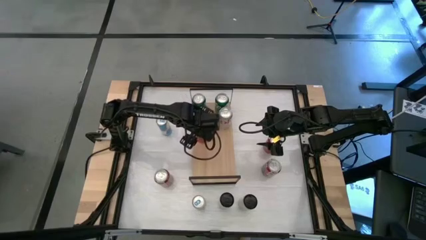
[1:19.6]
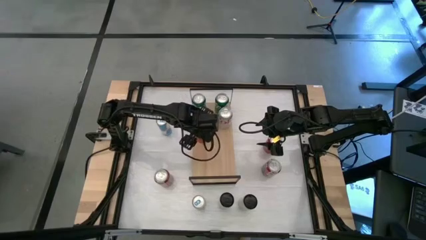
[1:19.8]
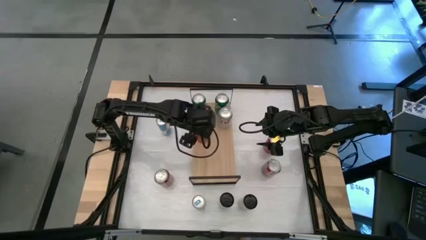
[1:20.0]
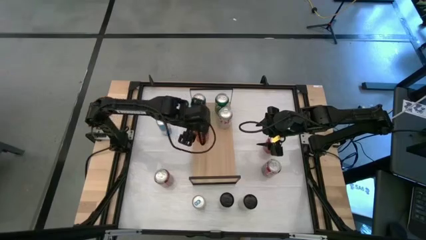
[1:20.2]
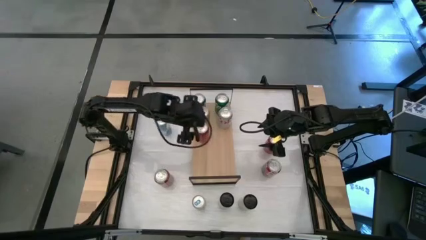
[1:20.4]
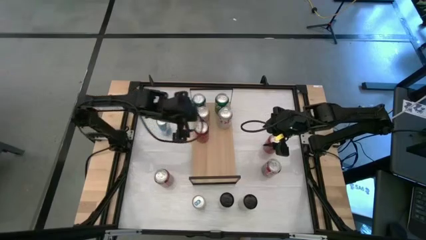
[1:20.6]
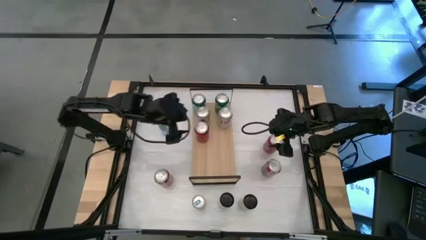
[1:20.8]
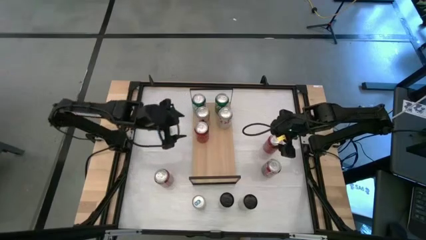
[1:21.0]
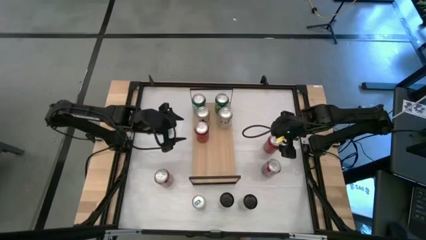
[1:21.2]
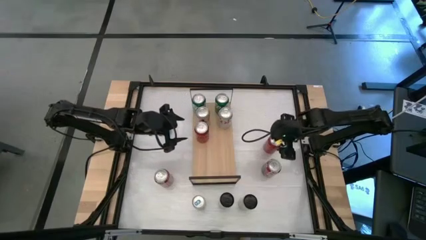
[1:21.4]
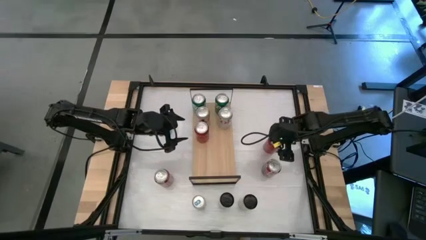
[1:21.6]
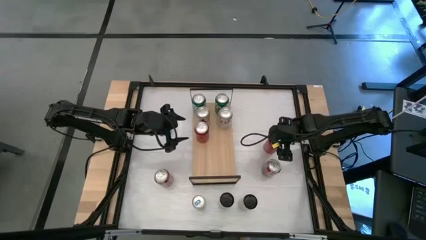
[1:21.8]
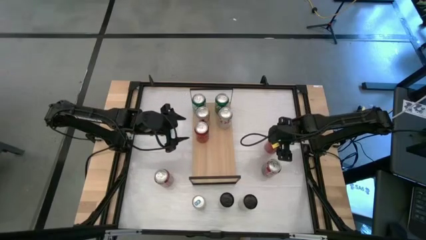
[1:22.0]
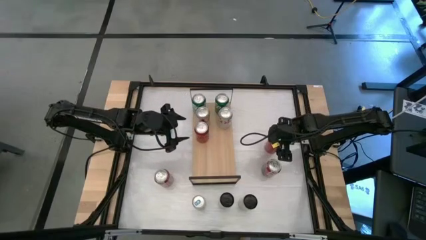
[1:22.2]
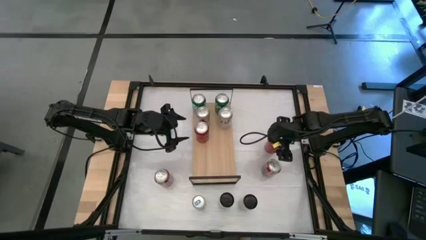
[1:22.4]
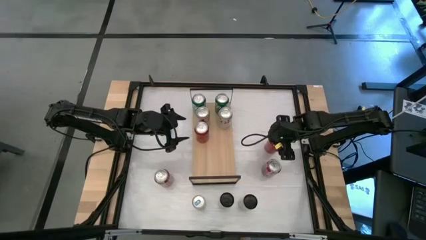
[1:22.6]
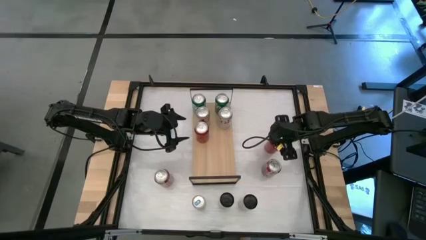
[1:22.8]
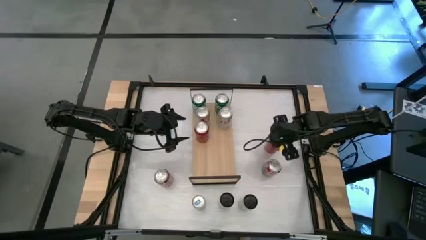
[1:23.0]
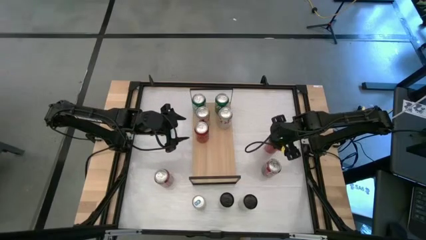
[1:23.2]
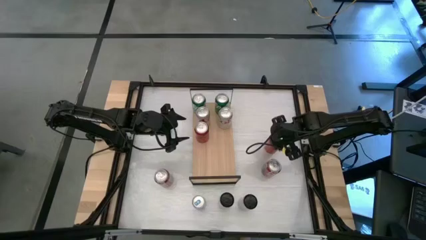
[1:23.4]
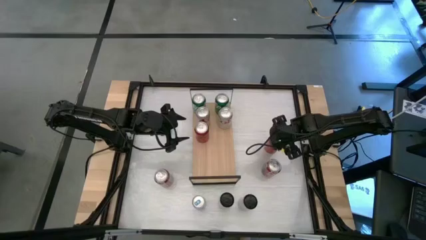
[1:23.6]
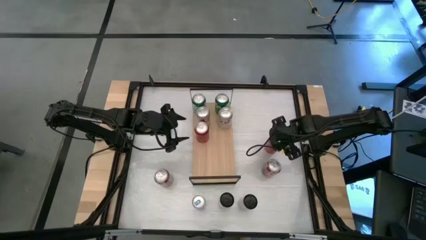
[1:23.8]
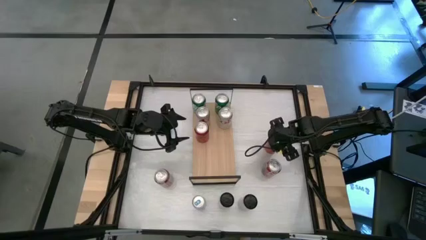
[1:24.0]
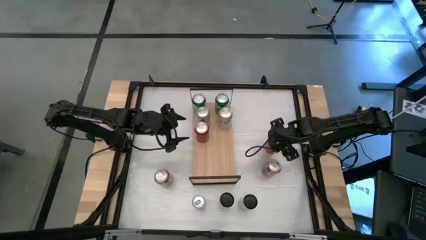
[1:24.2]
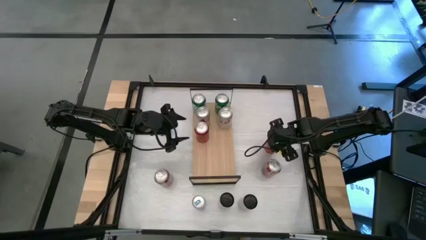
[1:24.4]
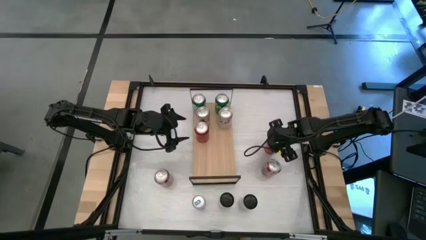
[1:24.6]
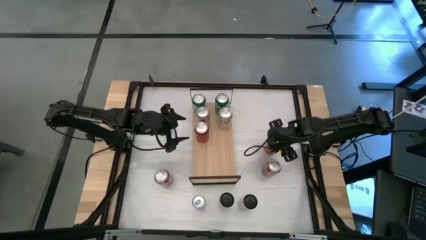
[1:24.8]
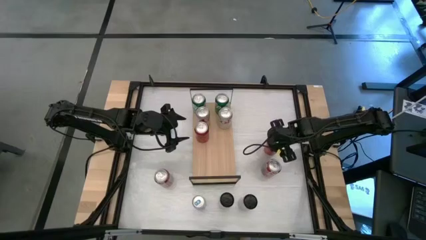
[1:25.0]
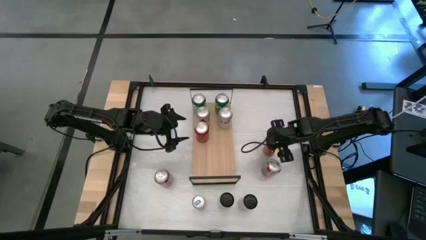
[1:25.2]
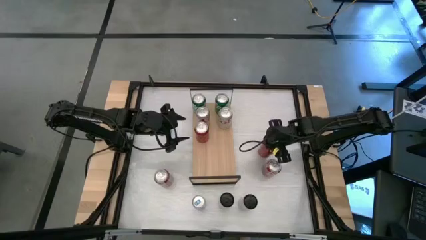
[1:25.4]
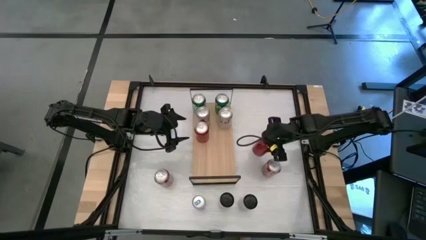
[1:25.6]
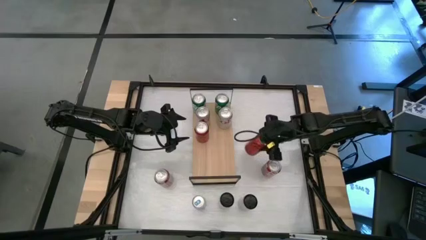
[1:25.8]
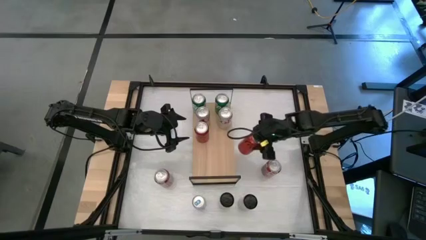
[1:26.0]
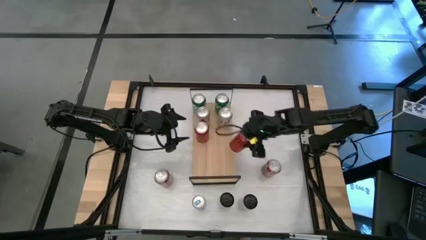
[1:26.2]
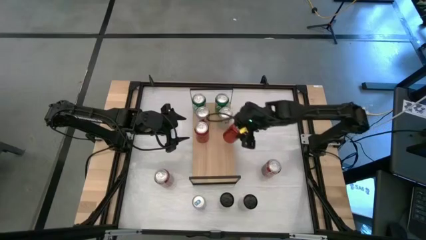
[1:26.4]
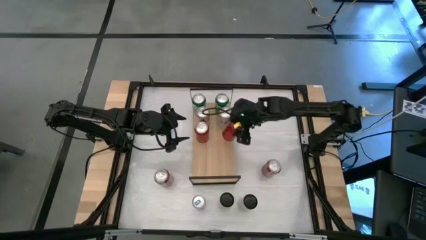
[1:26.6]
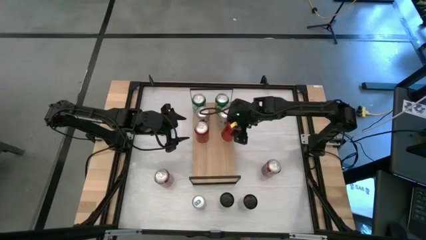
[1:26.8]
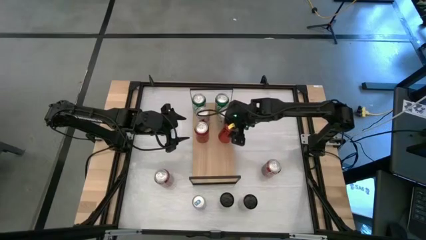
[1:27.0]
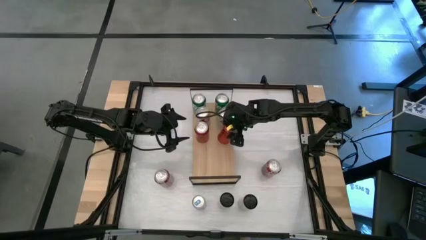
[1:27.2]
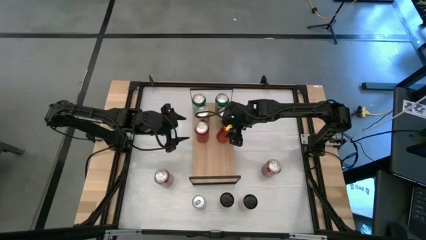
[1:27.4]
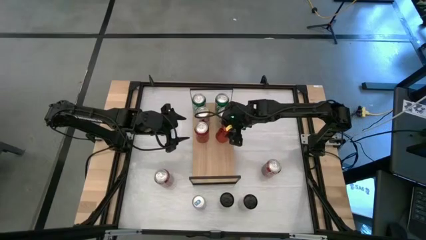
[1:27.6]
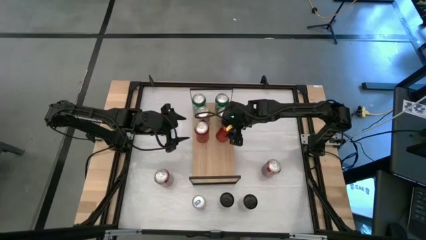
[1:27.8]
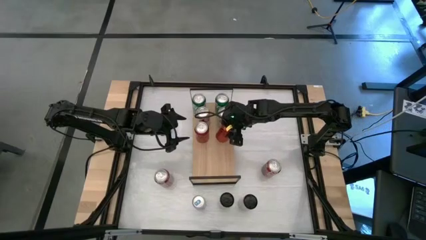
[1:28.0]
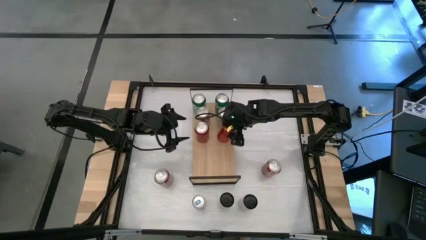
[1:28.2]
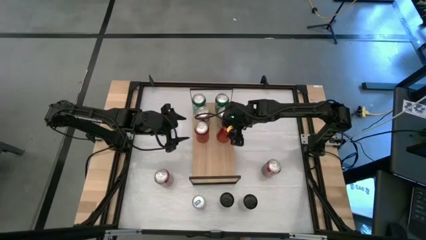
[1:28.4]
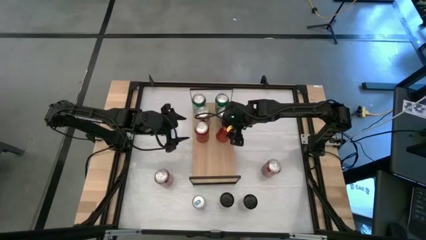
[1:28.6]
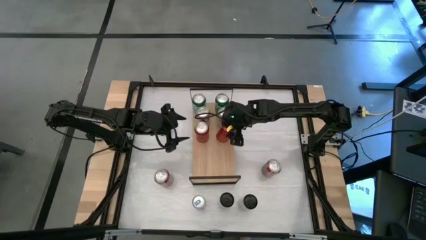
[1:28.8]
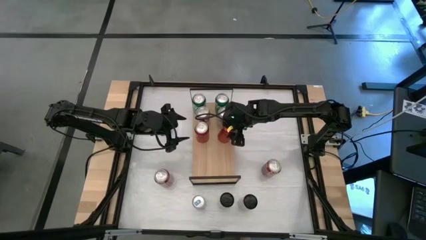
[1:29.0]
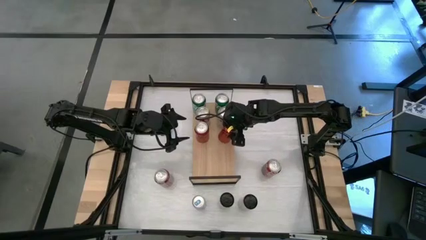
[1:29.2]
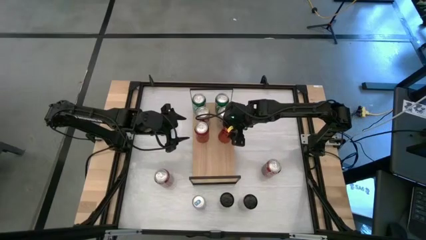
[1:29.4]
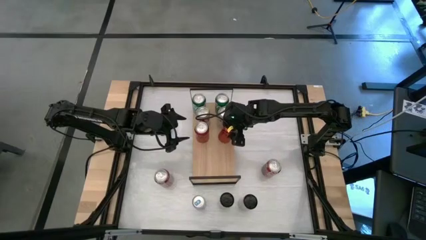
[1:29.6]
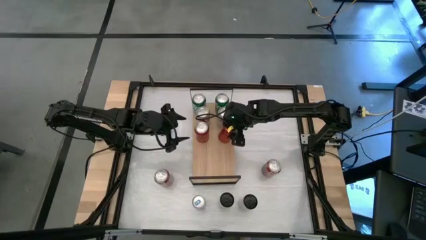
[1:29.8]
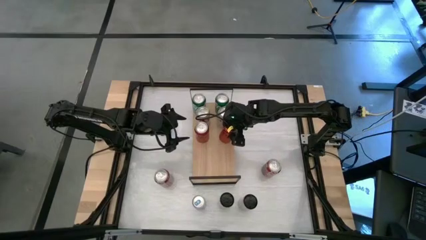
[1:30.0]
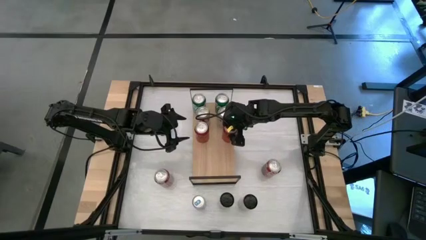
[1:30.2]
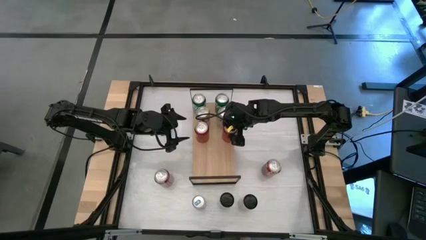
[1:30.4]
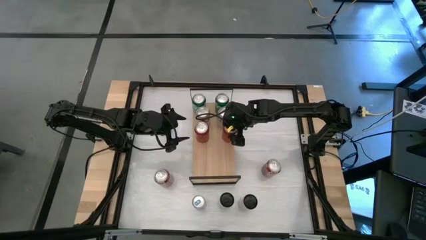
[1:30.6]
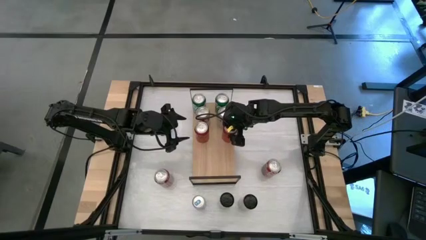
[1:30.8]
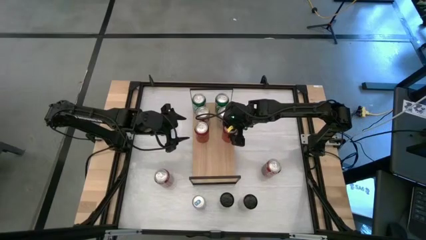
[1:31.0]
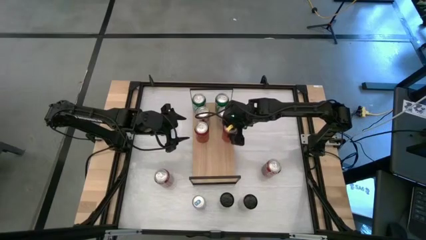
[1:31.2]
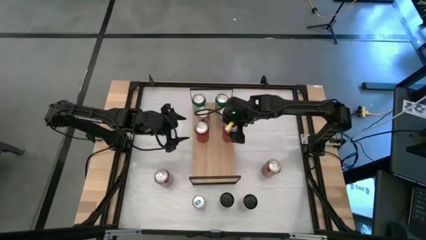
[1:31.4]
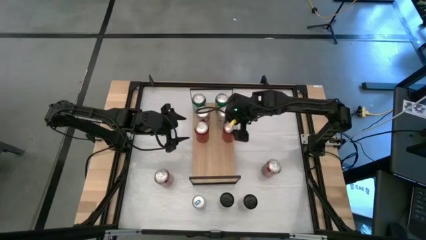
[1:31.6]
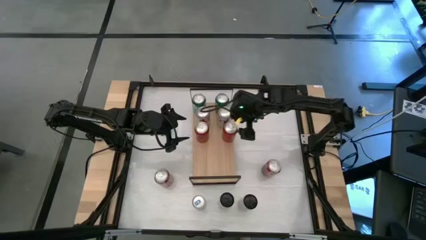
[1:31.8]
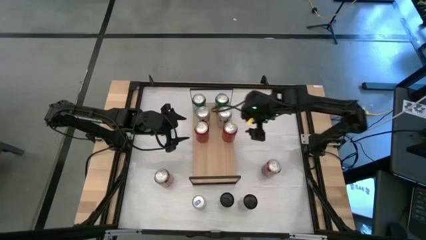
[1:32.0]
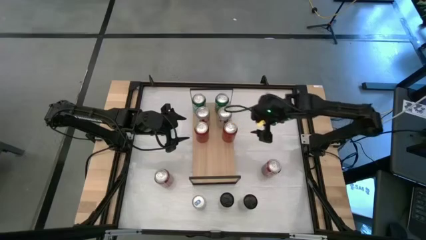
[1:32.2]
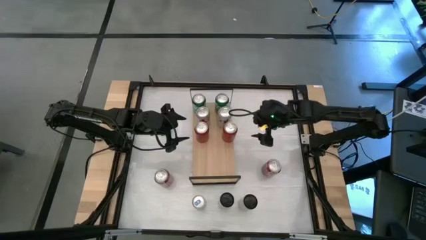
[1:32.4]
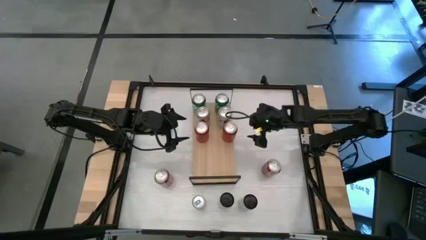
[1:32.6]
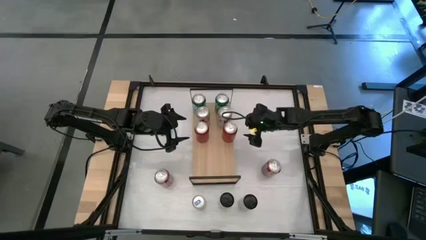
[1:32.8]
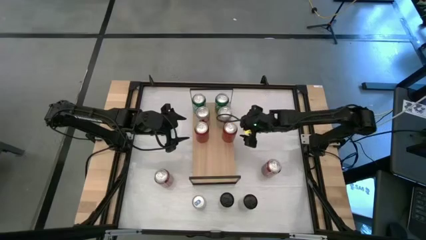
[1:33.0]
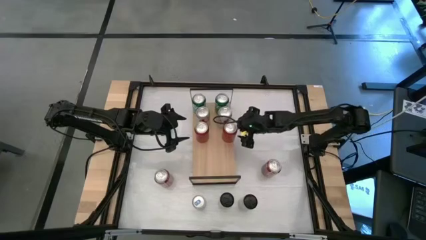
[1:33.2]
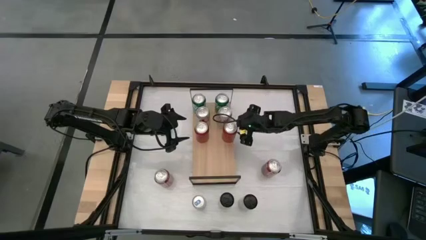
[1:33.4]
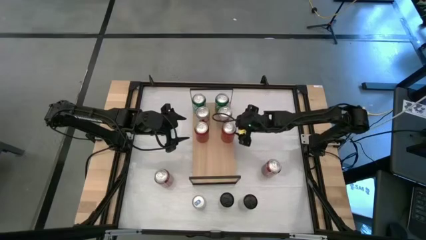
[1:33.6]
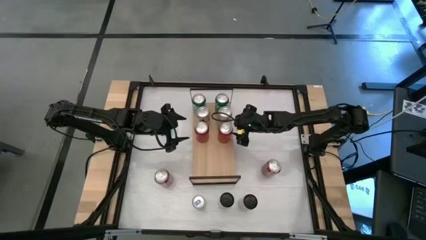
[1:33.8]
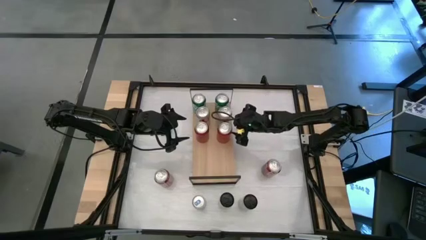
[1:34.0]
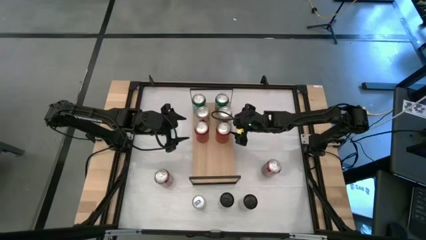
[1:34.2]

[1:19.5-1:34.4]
Task: Place canned beverage on shelf
Put the black soda can on the shelf aligned with the other black soda can
